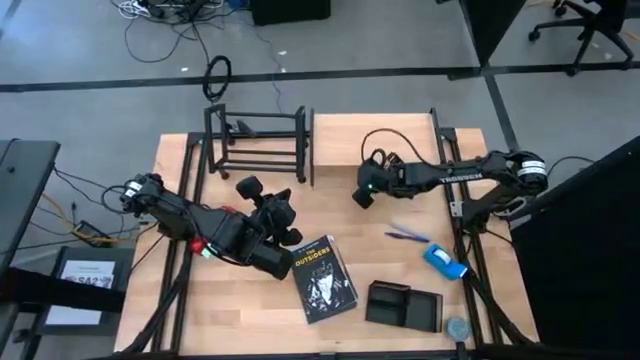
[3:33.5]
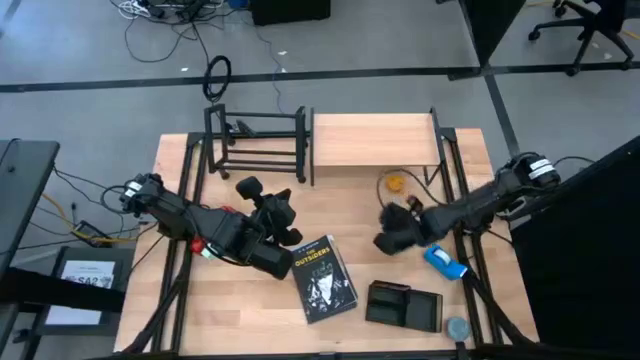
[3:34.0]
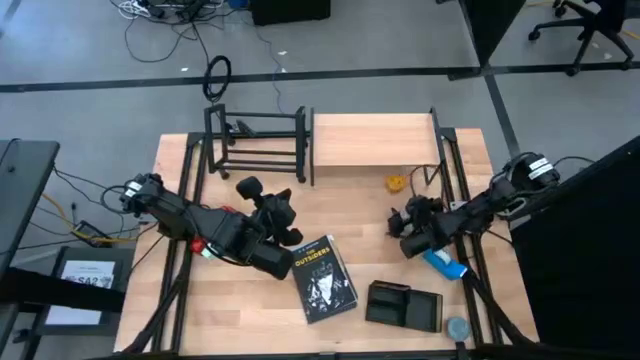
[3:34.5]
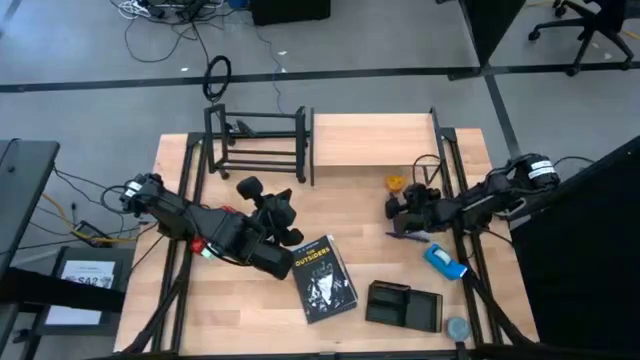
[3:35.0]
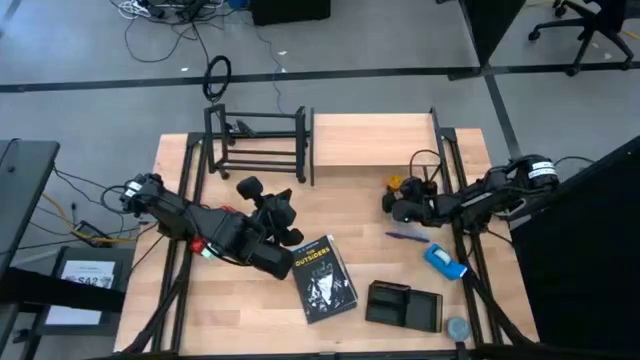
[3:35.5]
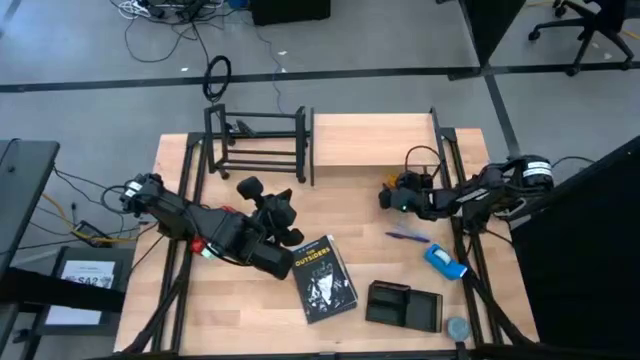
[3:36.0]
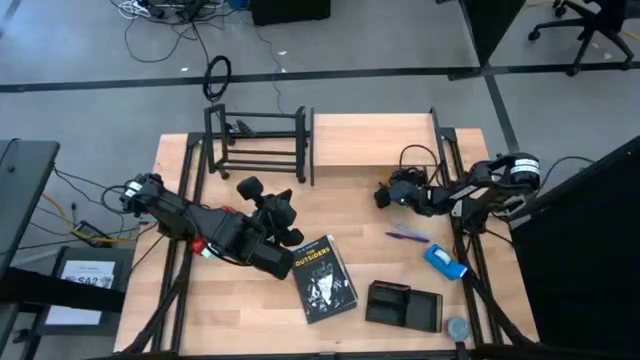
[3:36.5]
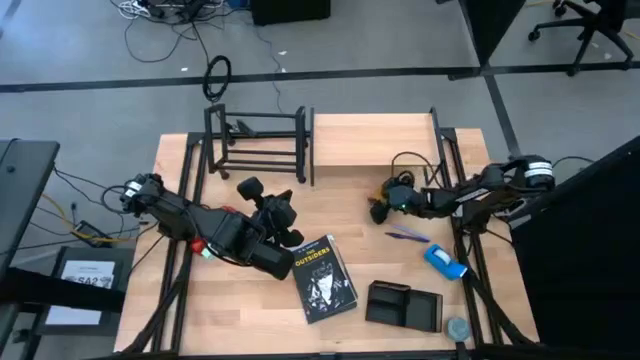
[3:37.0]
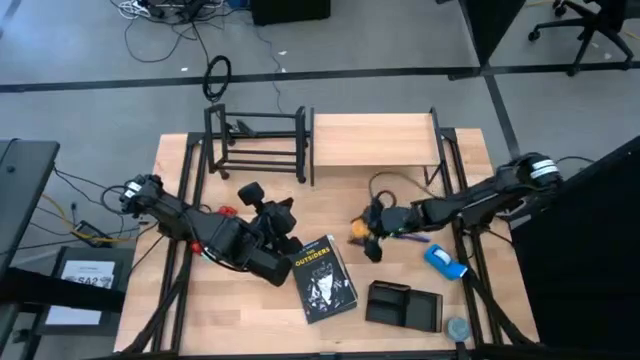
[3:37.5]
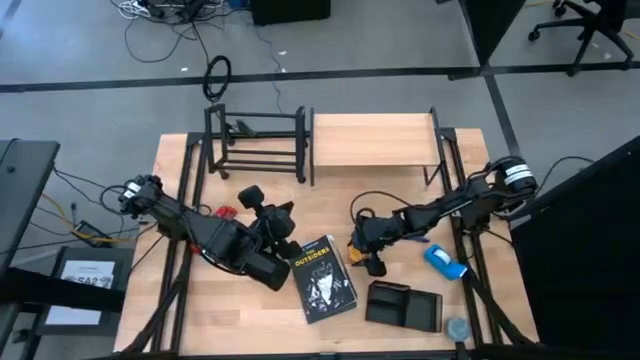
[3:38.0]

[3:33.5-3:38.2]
Task: Stock shelves
Remove the yellow scented candle from under the shelf

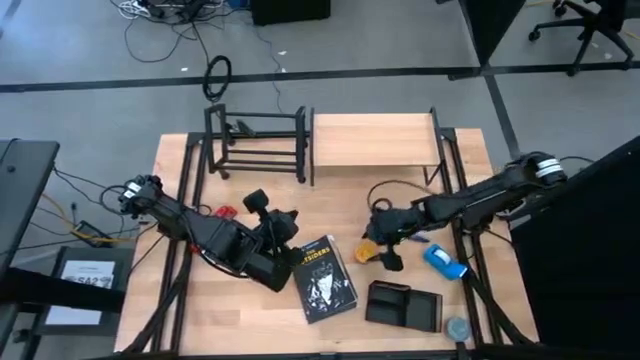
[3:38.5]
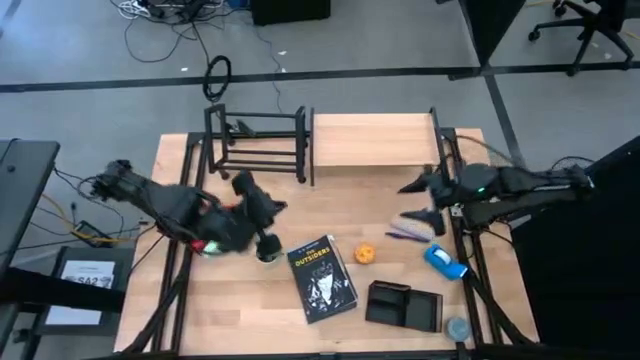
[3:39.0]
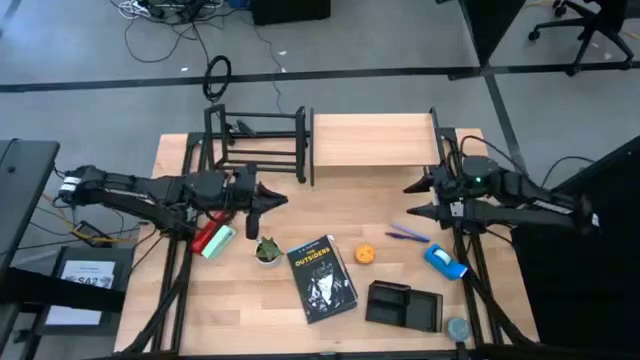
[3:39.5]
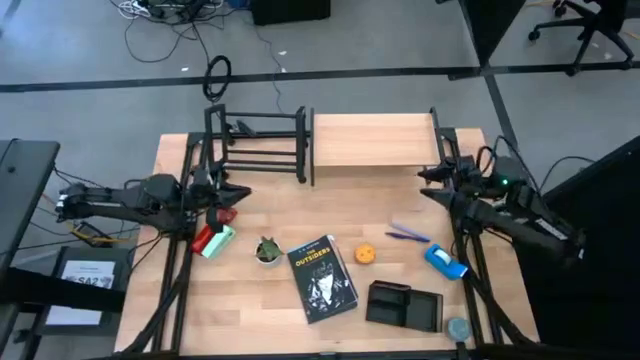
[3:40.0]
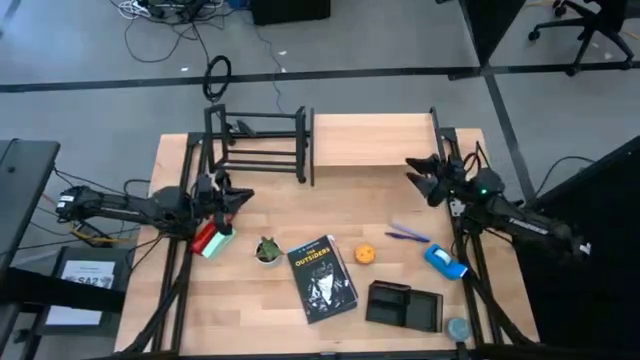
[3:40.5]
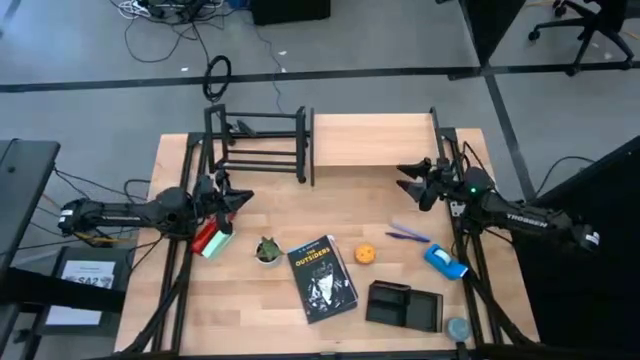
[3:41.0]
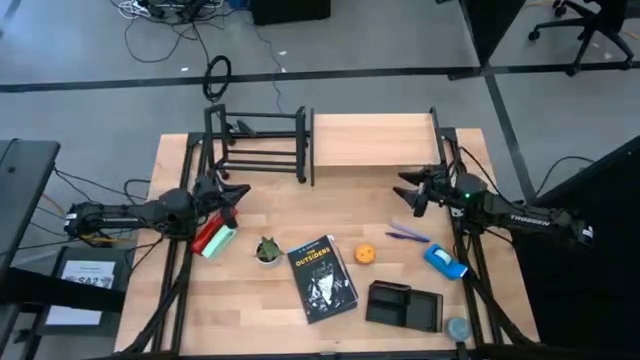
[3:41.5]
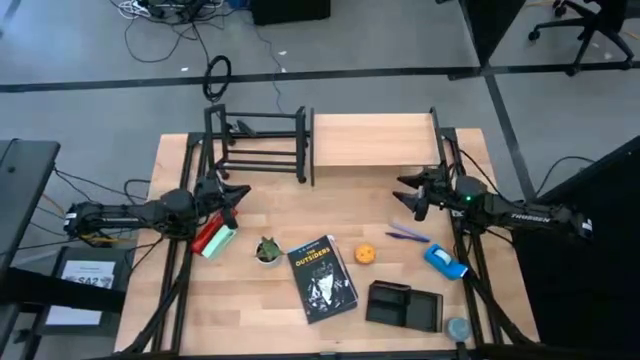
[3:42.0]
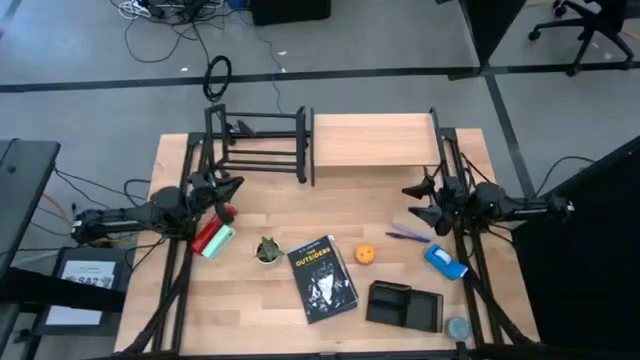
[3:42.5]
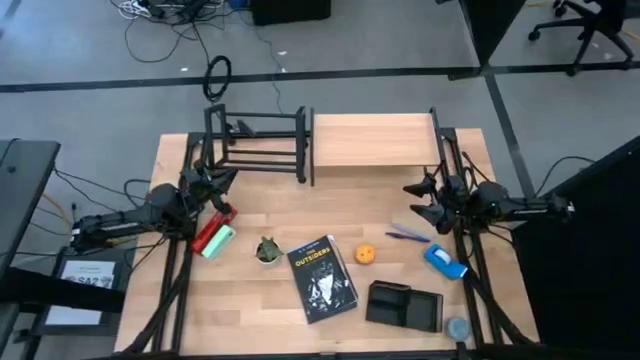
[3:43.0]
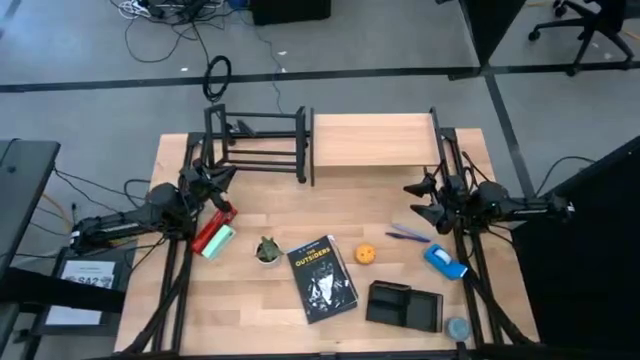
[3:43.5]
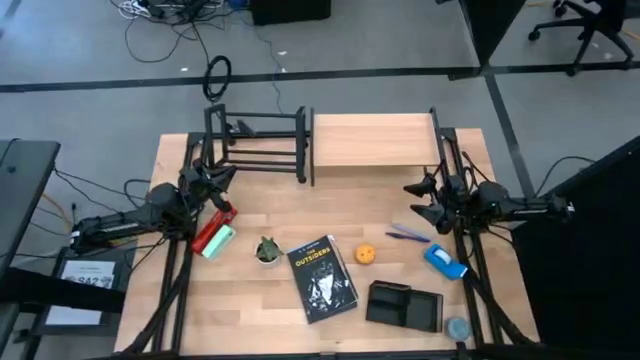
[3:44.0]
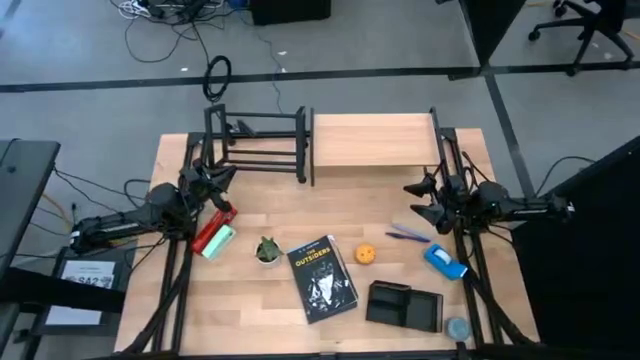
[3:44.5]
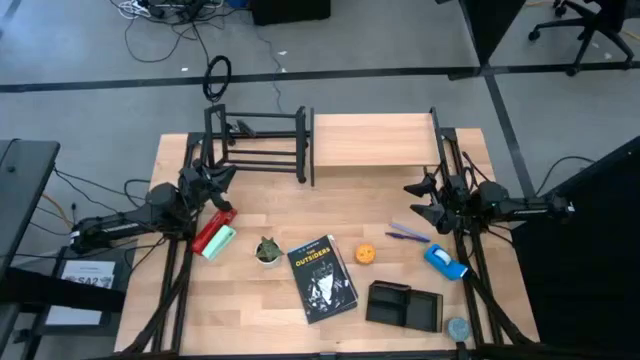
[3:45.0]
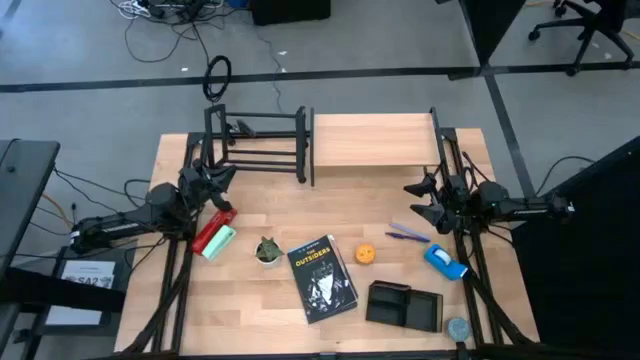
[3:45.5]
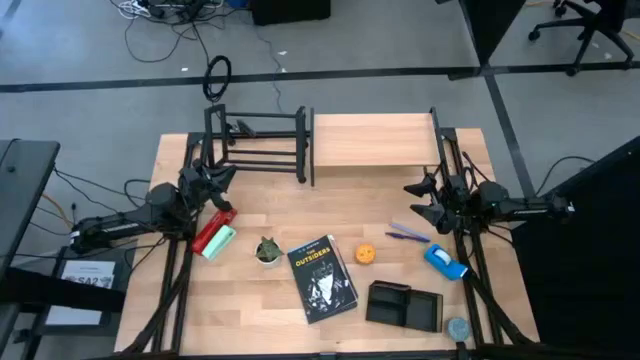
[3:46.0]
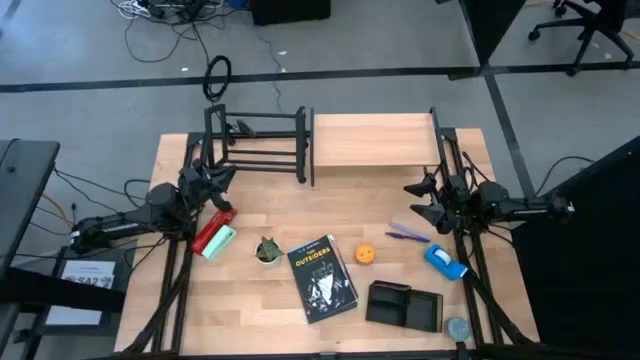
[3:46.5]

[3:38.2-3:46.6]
Return to Home Position

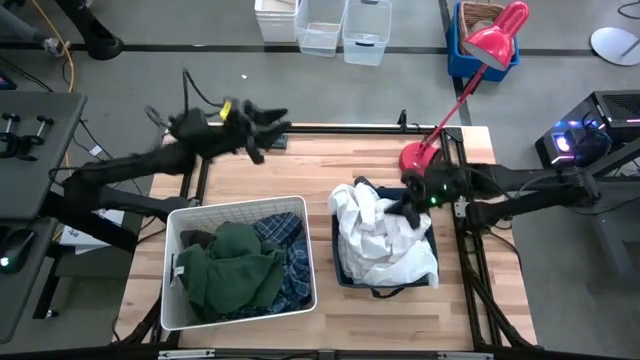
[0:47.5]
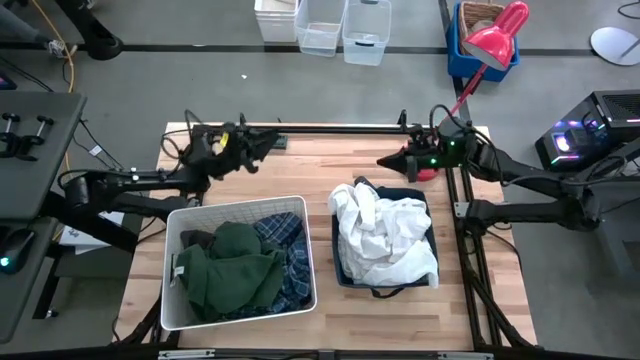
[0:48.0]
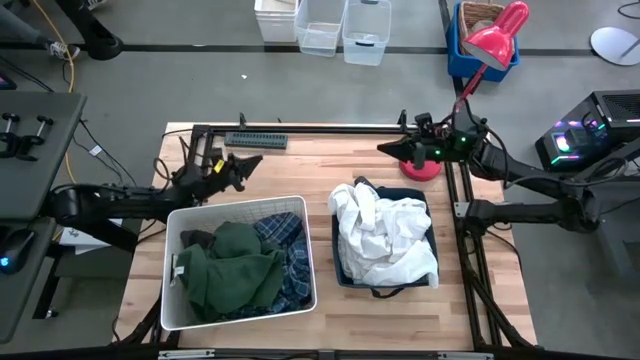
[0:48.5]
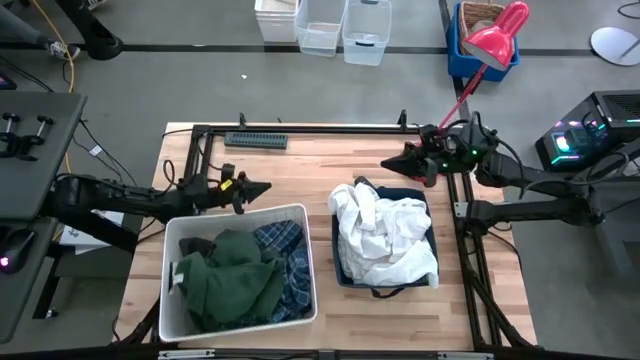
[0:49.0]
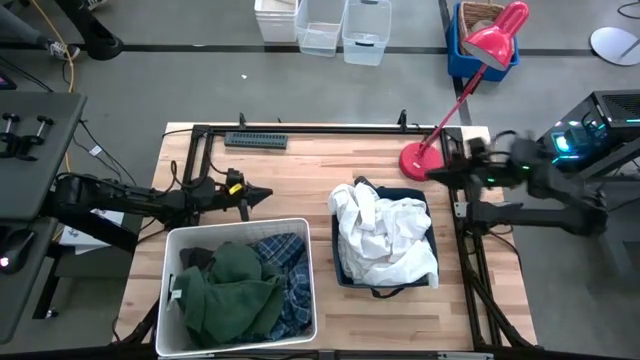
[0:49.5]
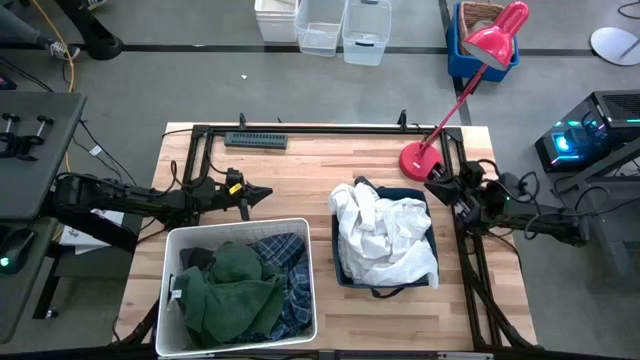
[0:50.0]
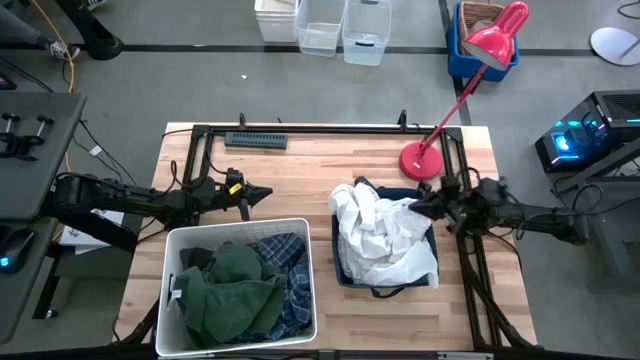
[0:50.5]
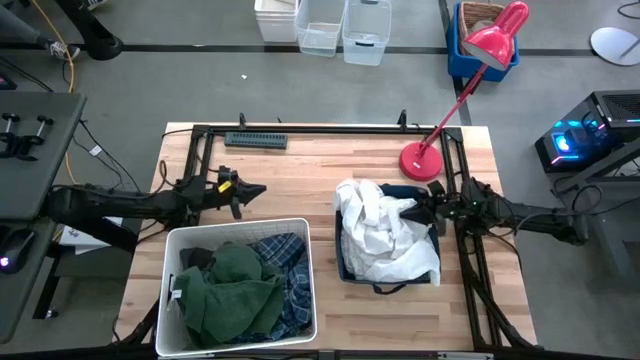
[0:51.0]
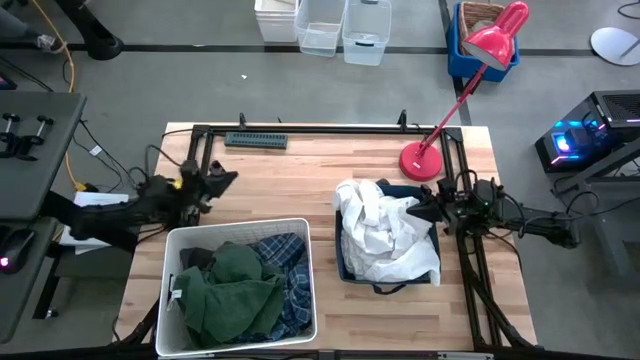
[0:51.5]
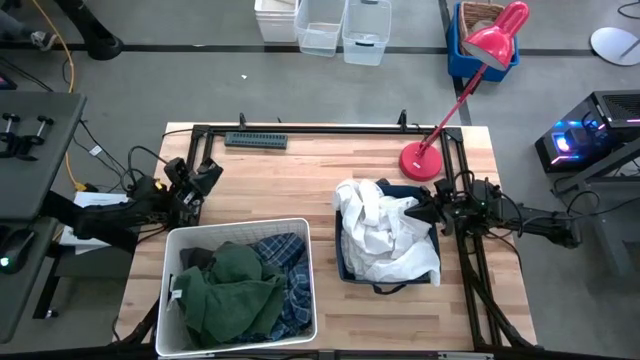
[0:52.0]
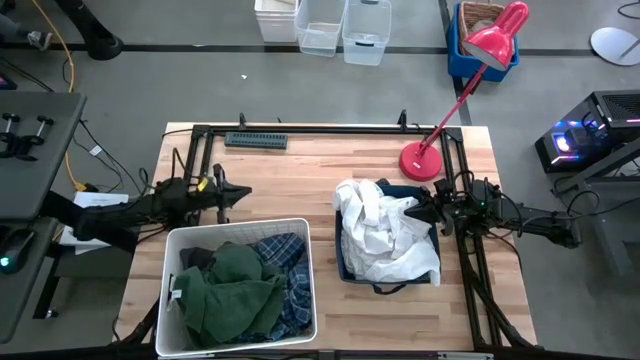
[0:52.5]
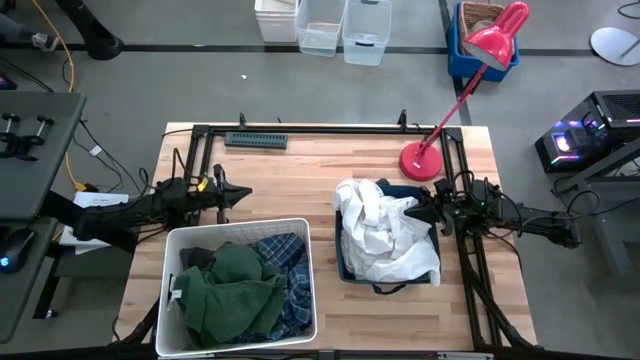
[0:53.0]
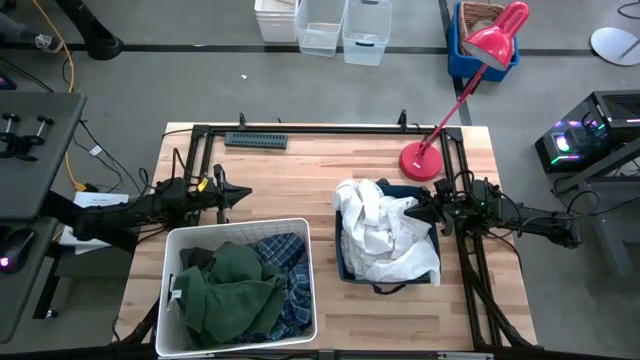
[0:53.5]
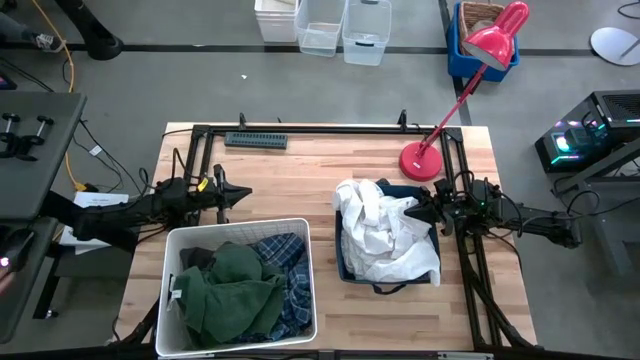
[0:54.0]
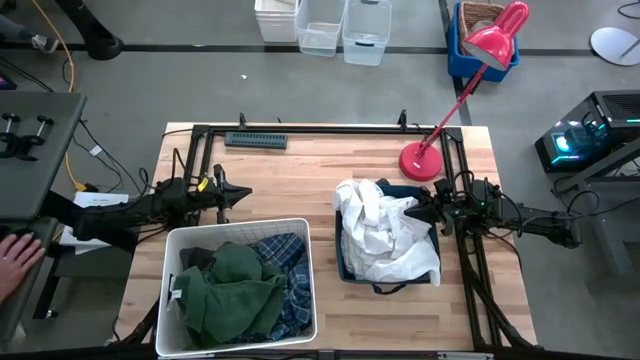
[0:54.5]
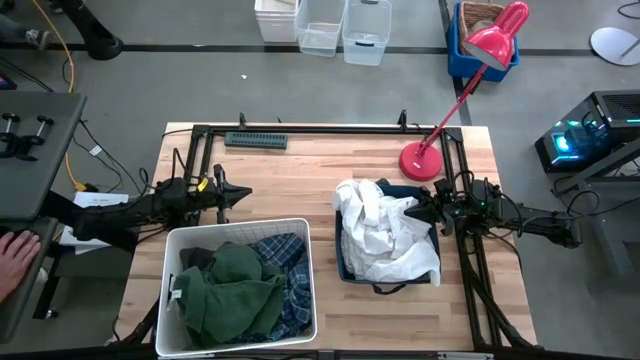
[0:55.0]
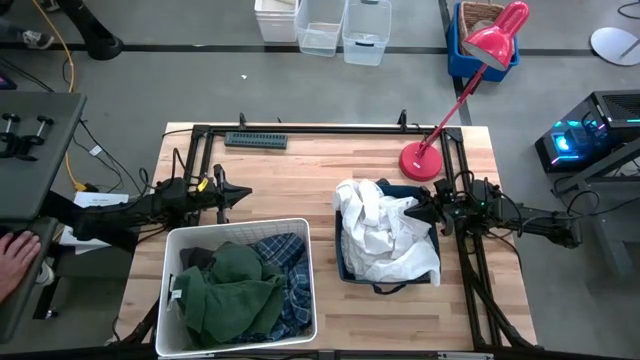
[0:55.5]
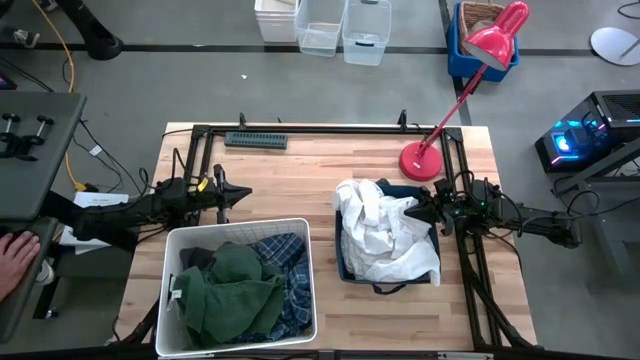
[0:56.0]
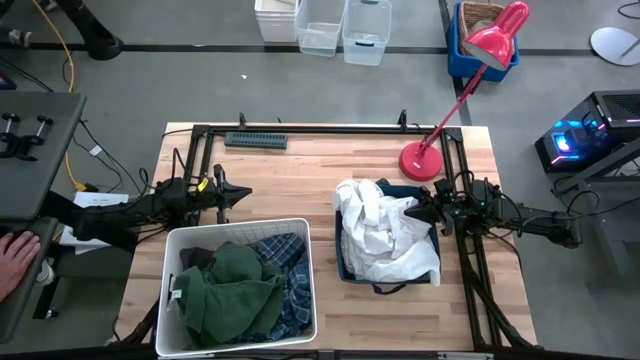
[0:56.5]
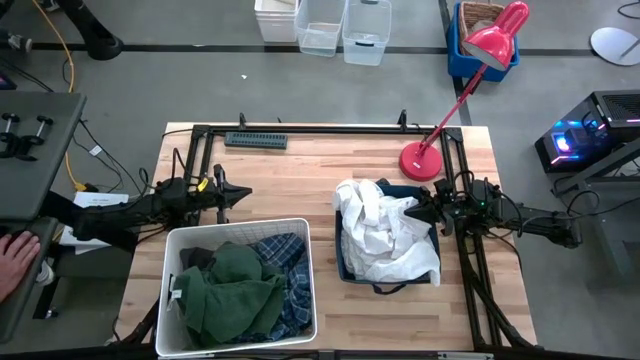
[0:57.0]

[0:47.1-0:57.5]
Task: Sort clothes
Return to Home Position
